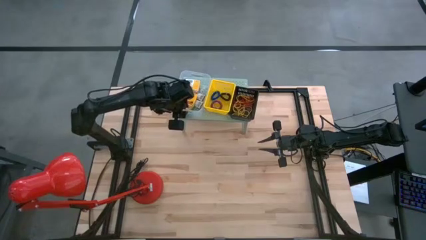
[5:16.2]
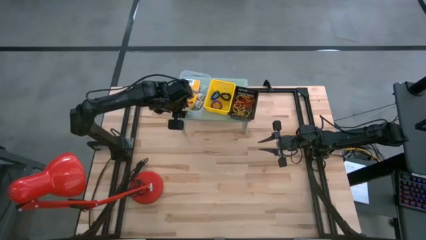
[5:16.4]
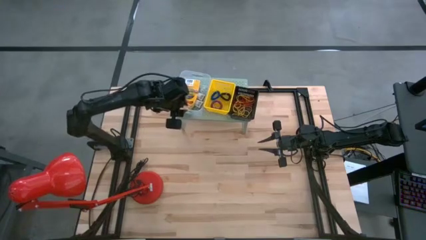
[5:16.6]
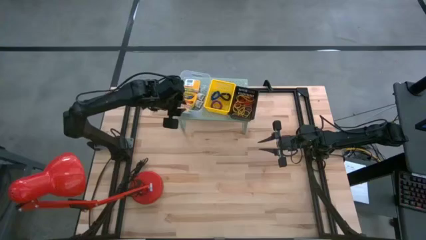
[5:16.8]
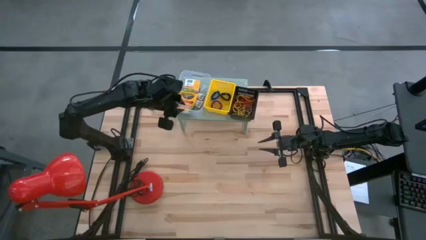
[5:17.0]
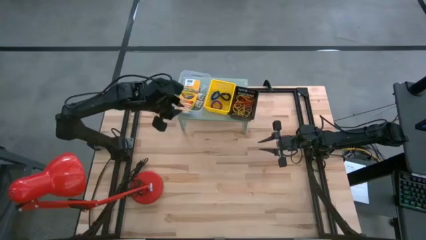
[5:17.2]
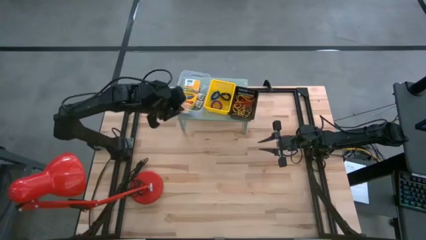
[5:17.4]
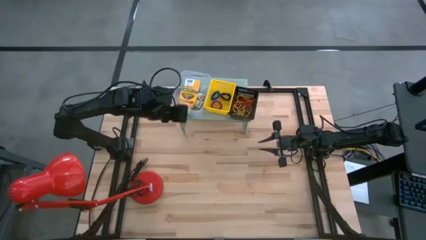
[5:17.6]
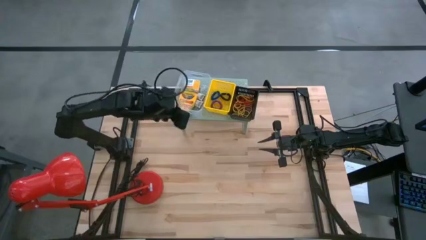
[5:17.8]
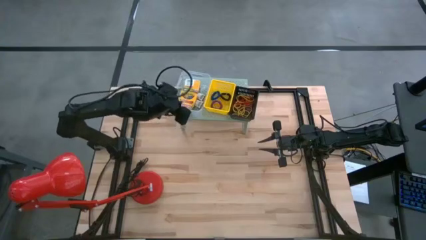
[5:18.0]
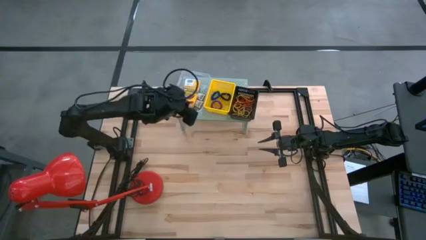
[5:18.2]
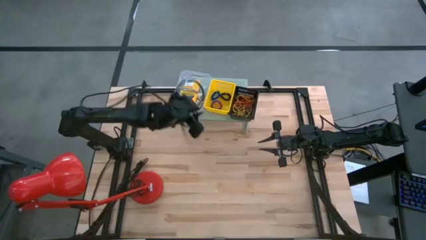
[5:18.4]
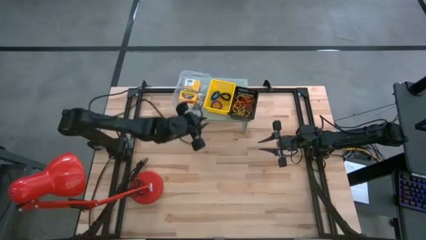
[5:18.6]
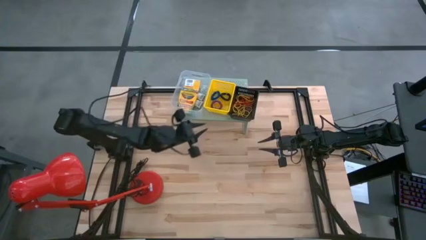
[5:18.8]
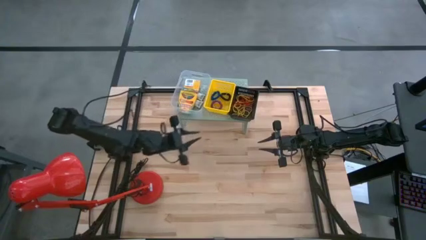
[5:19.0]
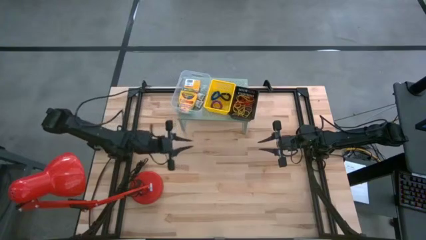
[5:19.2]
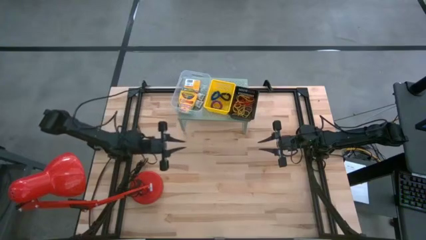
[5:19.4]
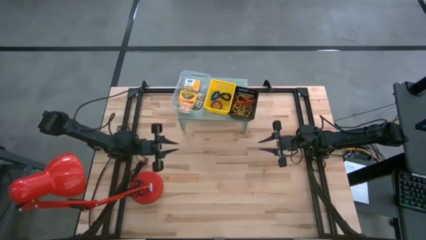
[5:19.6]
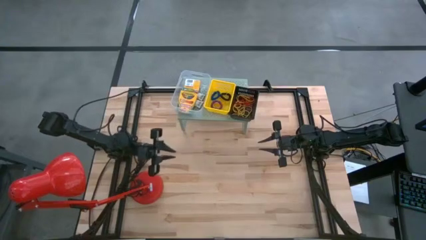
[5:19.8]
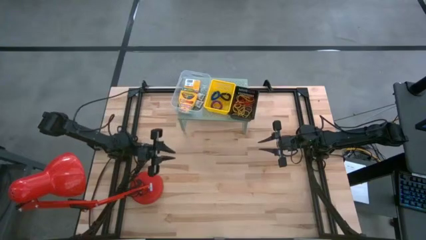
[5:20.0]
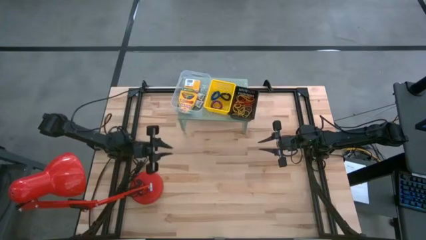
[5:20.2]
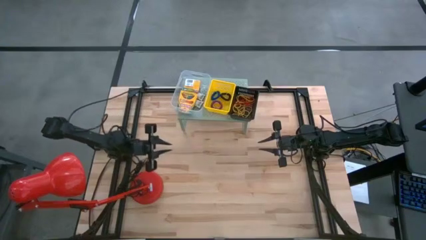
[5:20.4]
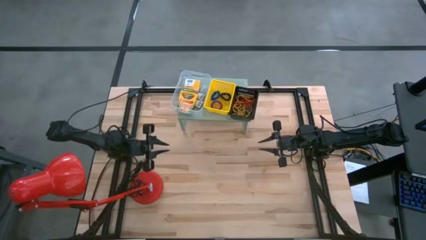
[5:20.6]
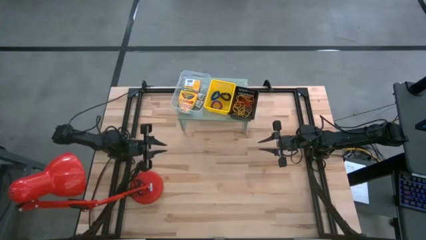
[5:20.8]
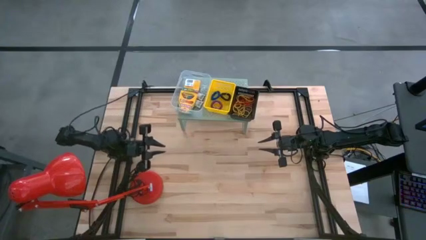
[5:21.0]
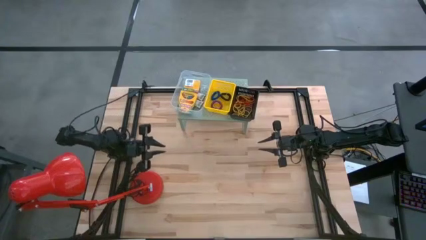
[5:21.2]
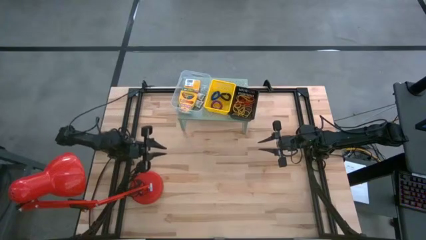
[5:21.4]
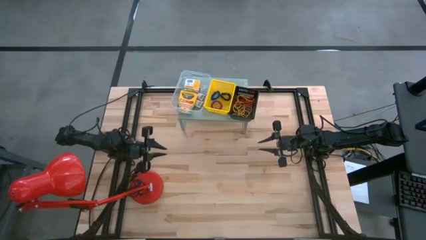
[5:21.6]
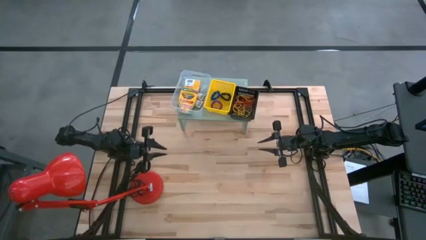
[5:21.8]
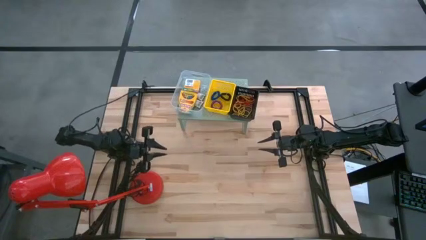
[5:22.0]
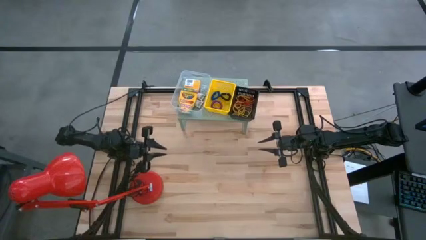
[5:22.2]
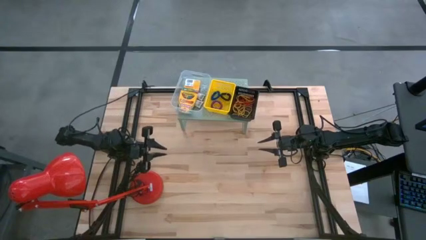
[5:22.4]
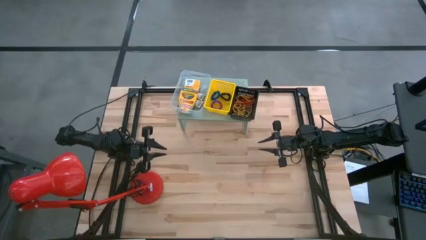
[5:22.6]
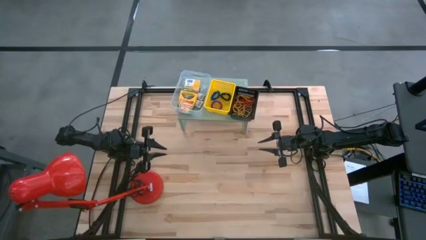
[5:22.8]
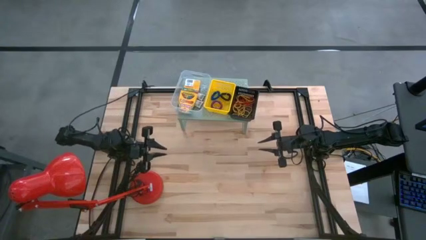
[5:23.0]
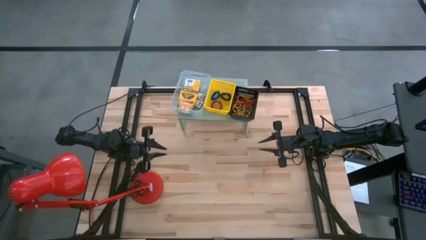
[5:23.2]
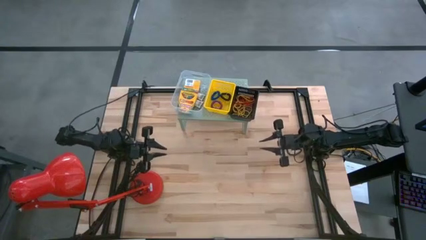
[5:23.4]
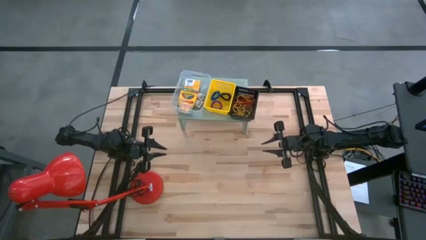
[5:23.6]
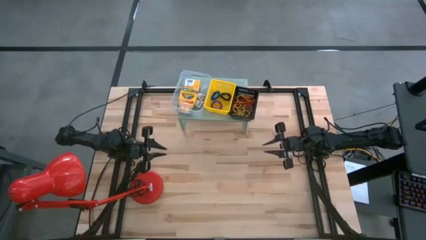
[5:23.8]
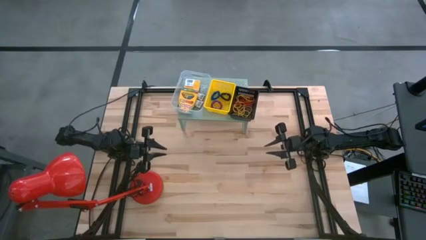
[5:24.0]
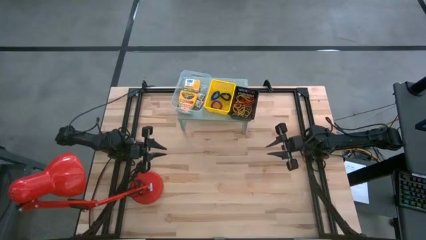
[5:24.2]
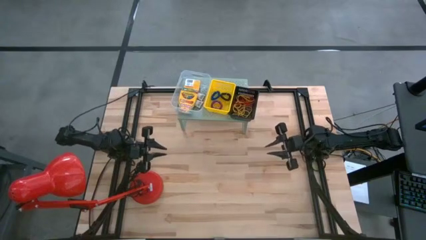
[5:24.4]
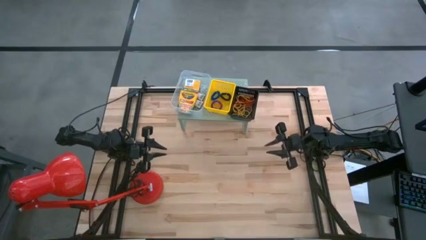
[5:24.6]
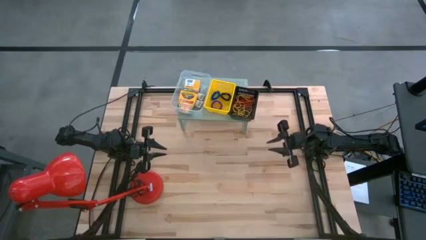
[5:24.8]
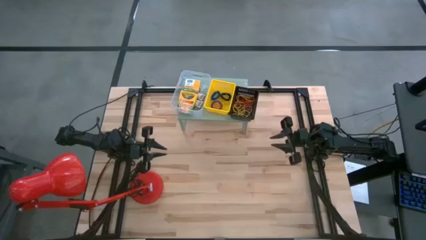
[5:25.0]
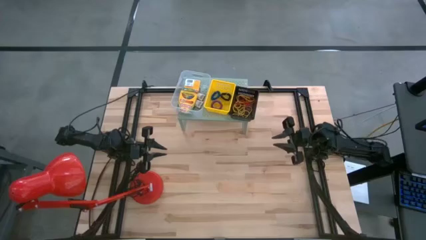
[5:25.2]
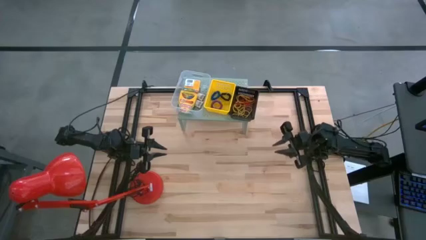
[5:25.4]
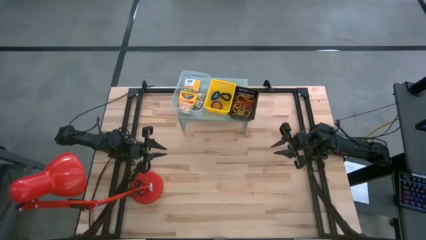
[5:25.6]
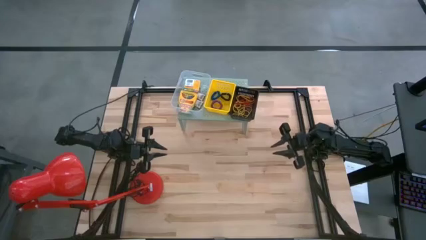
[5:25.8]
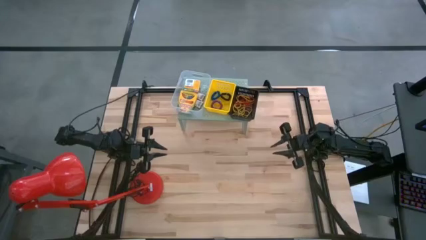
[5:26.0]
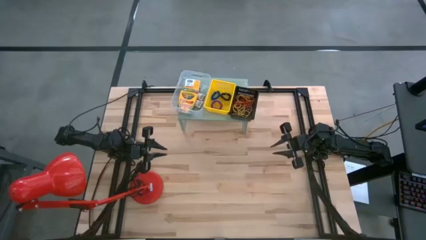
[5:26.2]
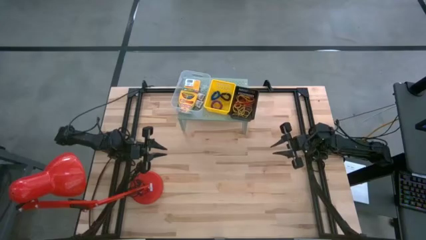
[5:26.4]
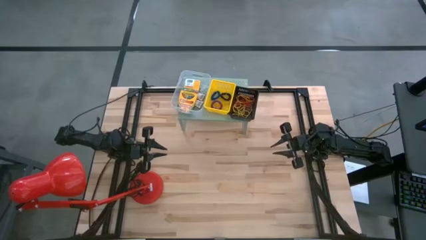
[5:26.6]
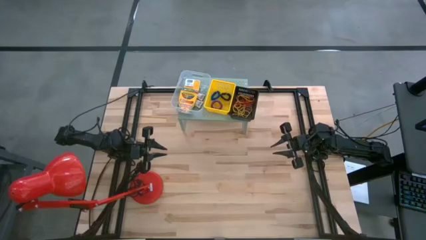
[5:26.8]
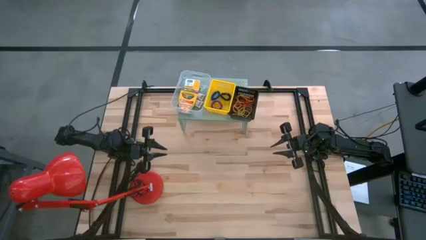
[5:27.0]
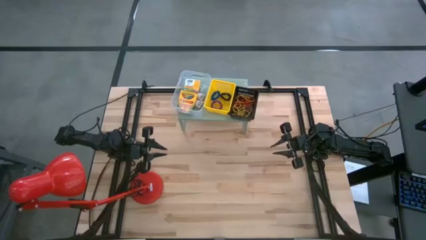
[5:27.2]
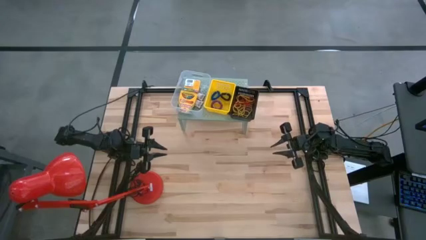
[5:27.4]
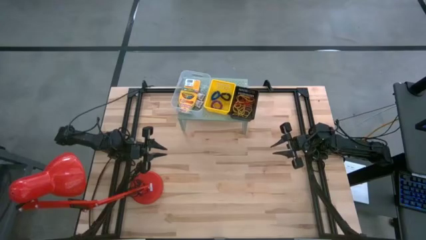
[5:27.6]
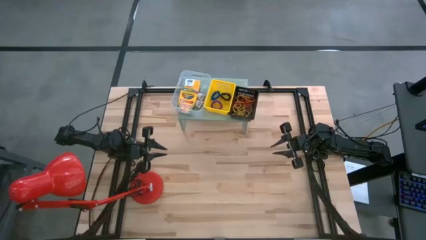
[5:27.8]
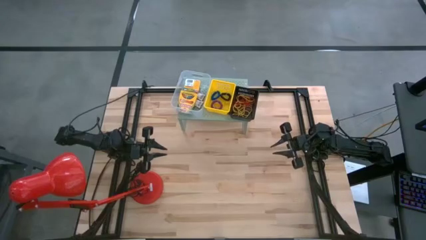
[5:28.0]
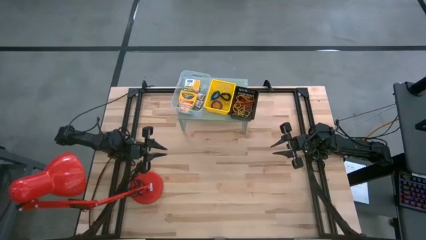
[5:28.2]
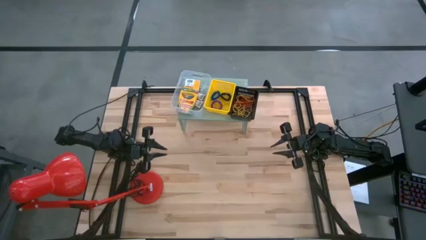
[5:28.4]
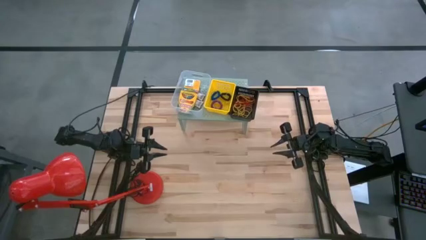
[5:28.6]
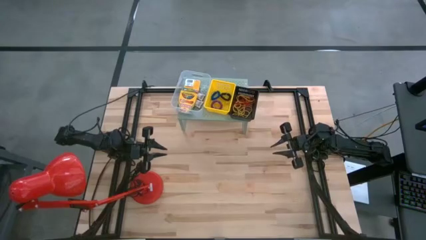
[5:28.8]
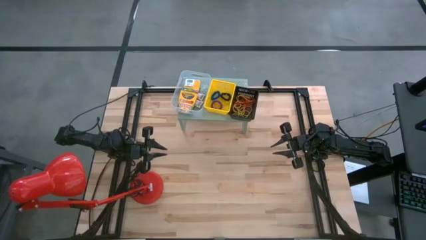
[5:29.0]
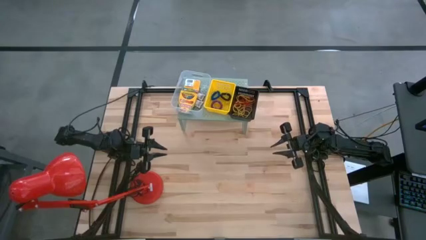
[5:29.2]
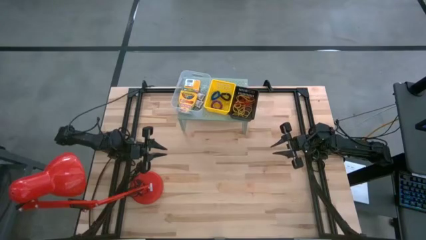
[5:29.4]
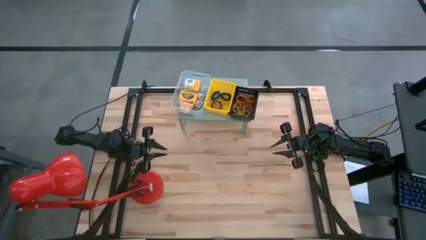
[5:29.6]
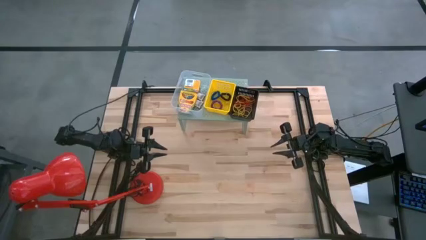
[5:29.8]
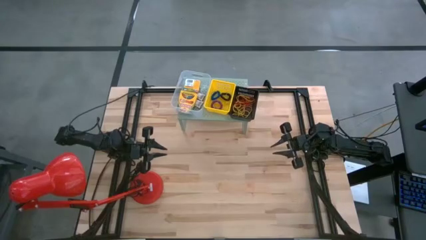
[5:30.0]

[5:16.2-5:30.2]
Task: Pick & Place Office Desk Supplies
Return to Home Position
